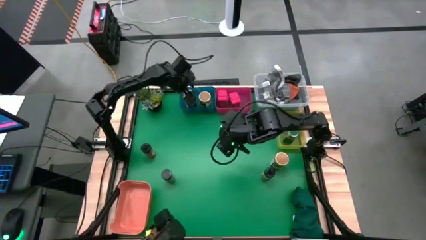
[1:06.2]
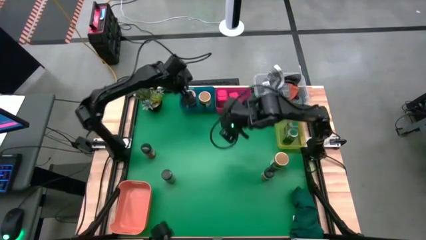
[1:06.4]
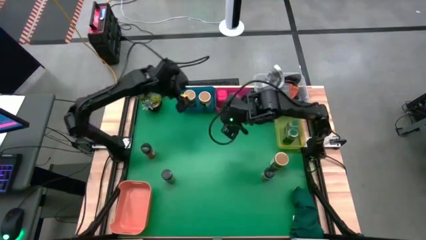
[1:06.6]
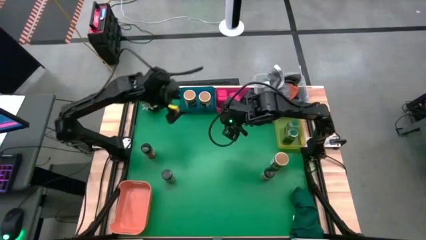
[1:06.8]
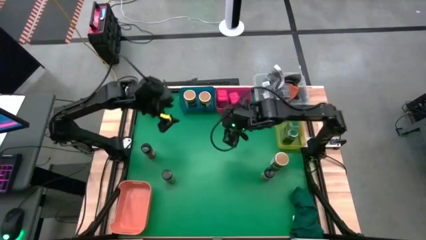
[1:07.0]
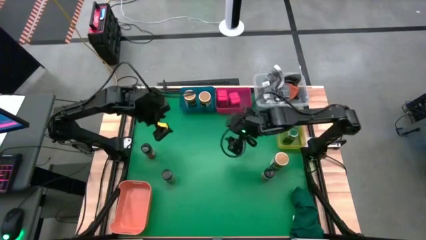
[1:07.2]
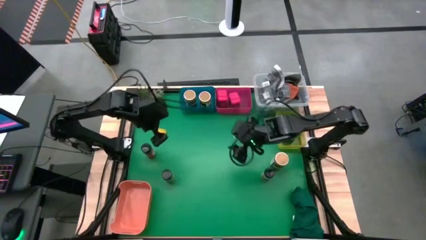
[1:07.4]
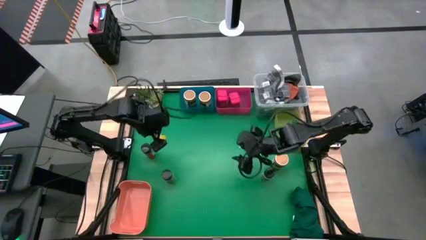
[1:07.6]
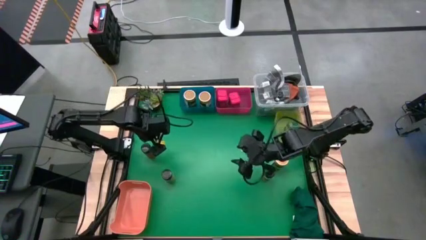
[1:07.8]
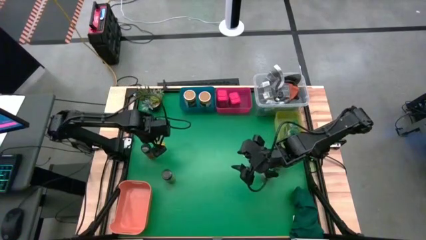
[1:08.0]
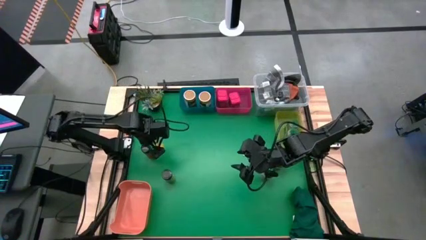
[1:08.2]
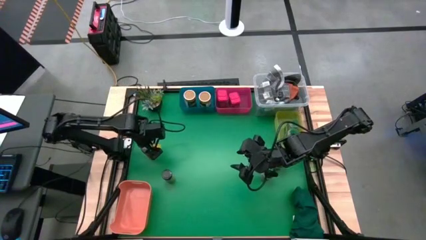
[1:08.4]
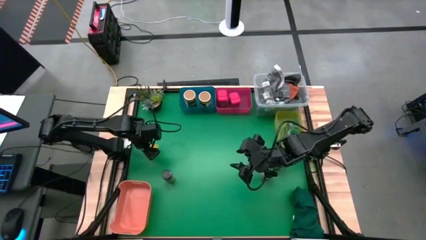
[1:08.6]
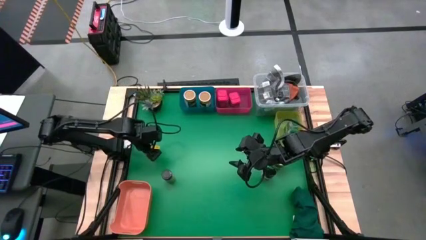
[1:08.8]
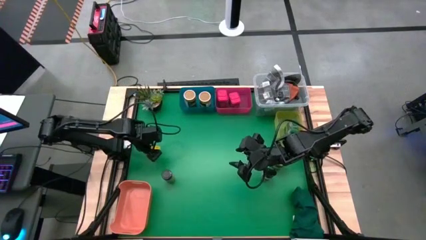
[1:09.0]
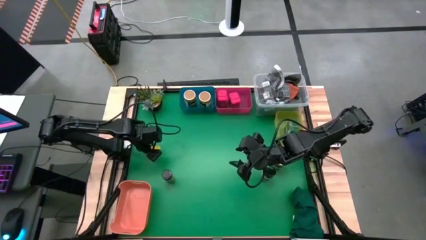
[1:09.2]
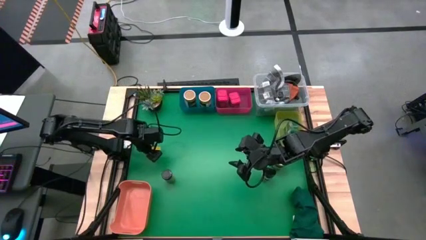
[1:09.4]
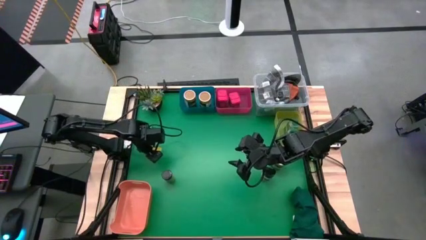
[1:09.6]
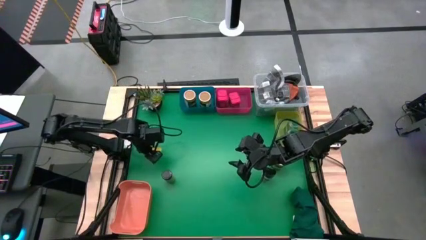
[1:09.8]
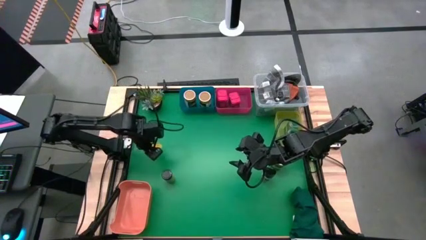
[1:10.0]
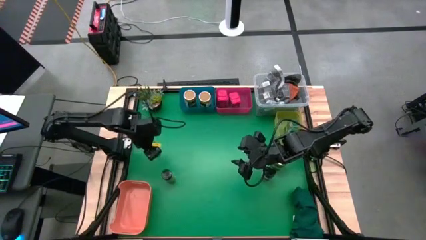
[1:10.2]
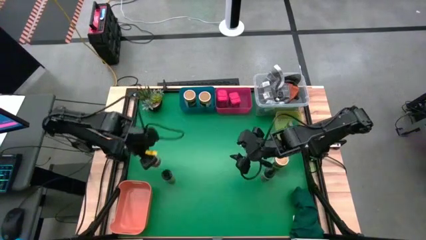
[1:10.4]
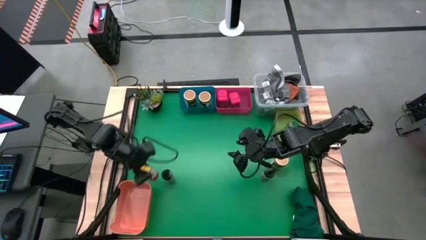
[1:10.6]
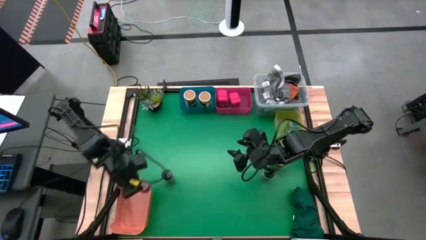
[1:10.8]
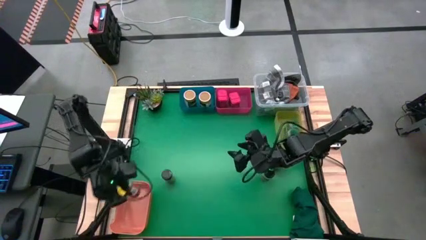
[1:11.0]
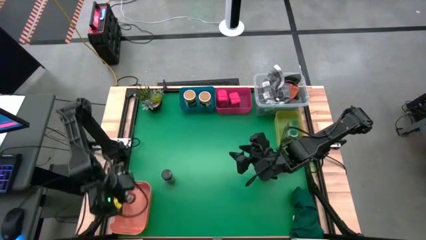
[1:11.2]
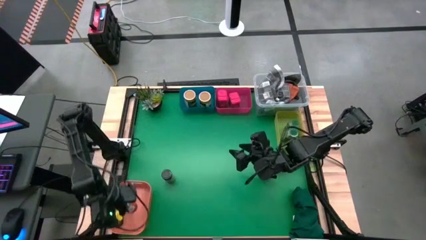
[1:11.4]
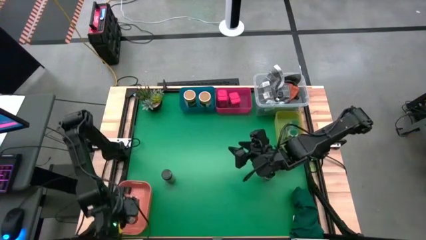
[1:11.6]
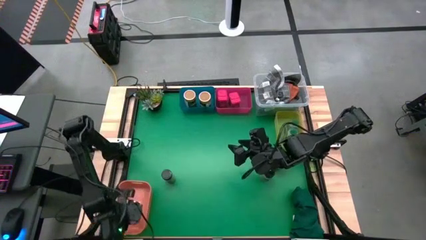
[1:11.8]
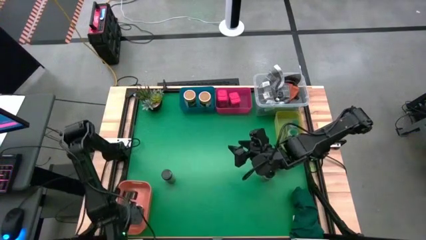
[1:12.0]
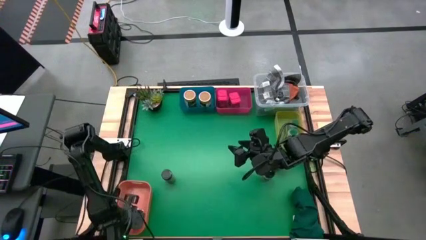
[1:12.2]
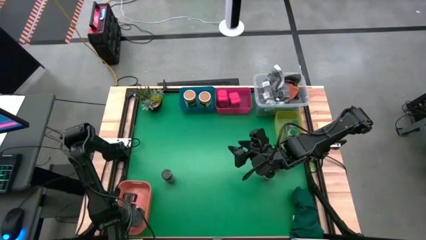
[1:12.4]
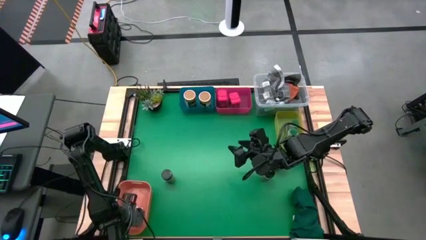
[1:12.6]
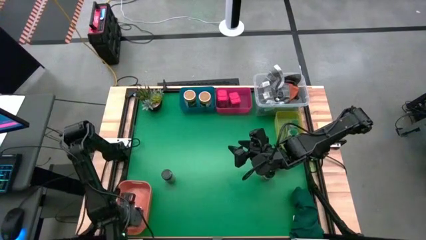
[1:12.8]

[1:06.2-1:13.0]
Task: Sort spices by type
Put the top left black spice bottle into the orange bin

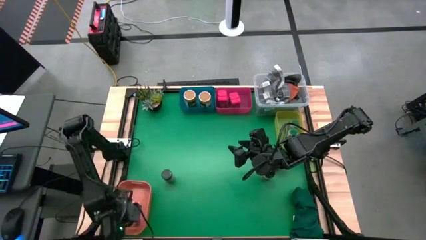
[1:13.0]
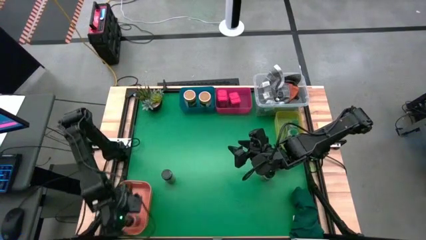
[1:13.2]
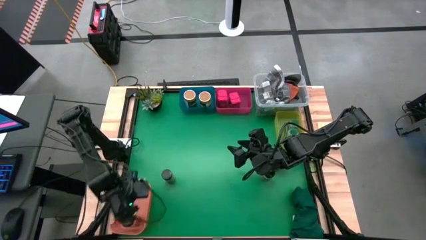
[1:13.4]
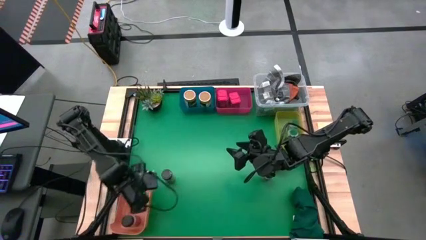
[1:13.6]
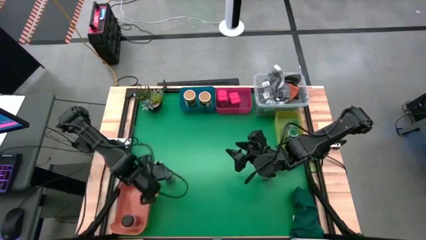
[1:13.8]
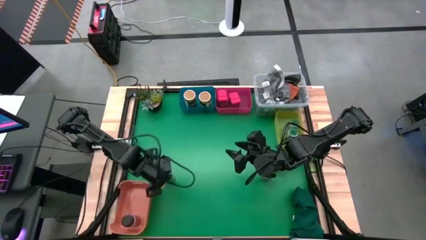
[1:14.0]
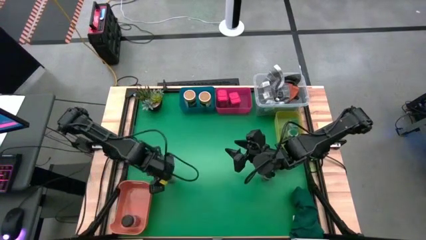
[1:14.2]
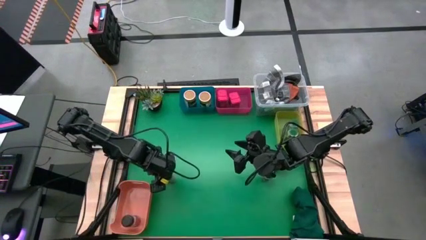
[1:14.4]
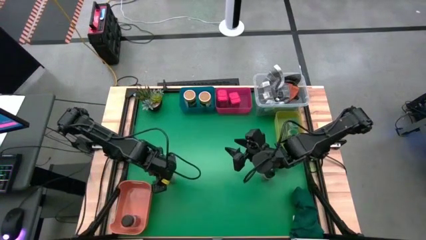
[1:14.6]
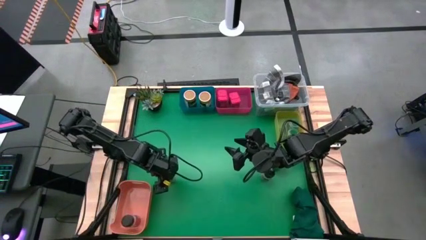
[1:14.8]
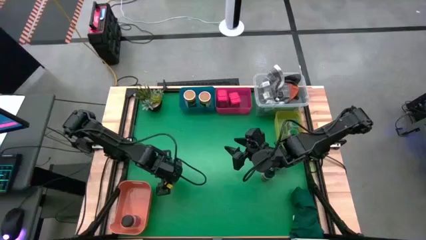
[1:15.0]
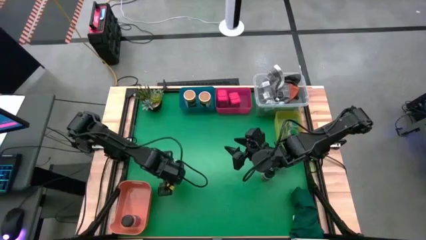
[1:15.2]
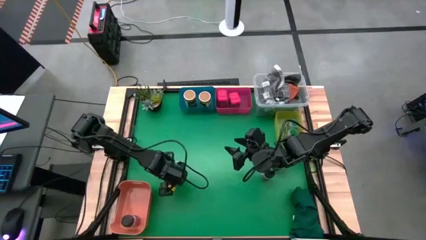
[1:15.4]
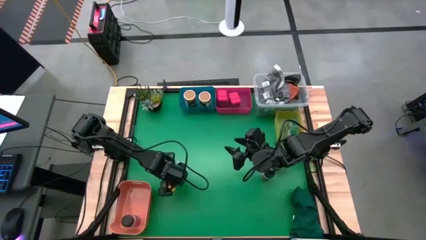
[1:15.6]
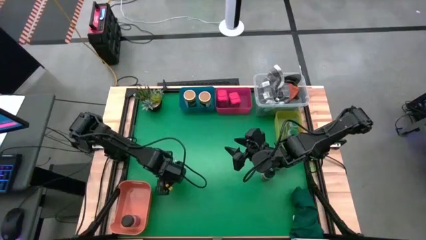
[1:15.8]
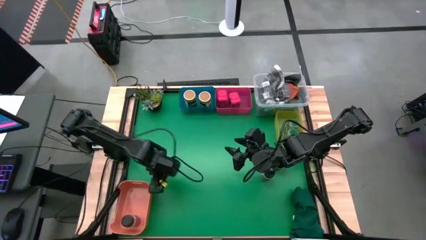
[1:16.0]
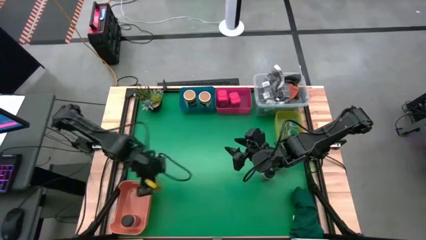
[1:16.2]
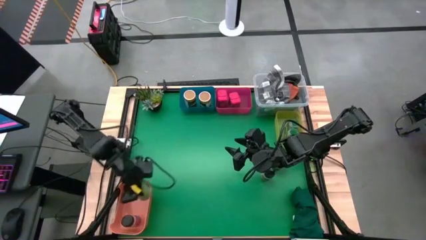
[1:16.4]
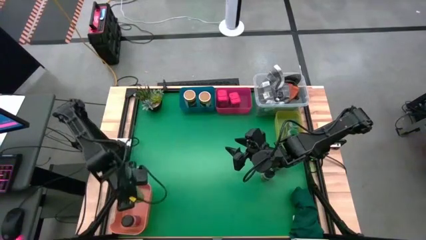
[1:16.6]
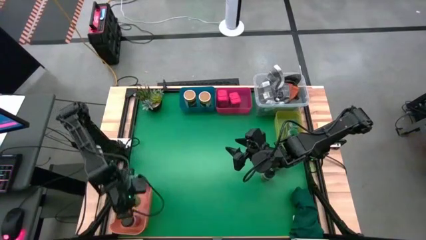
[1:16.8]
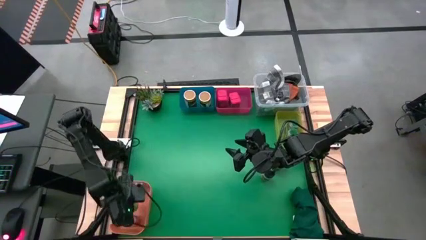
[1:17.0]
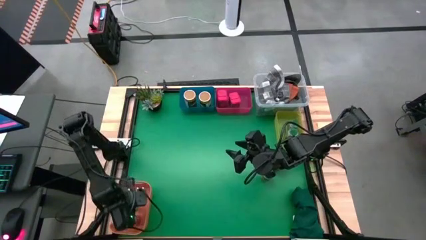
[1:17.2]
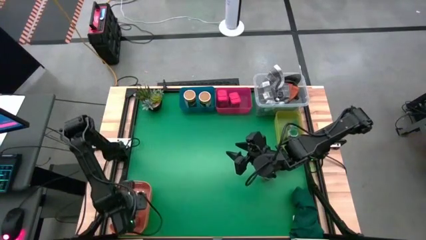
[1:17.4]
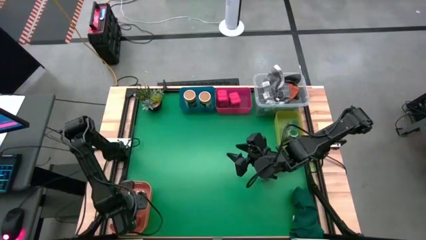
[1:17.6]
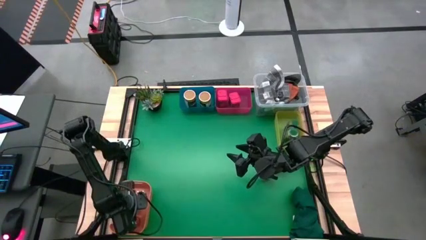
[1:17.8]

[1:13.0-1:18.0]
Put the left black spice bottle into the orange bin

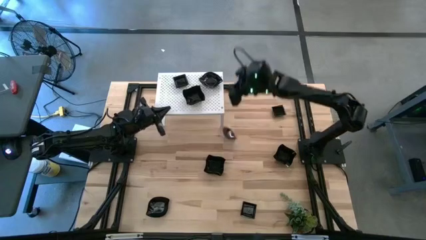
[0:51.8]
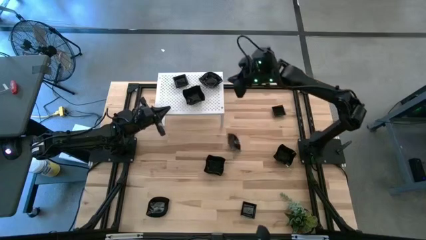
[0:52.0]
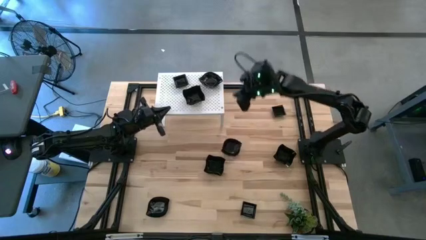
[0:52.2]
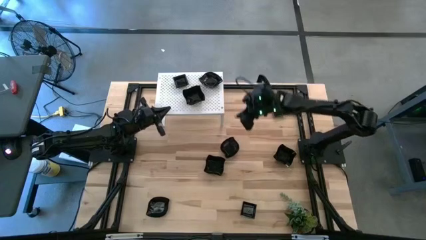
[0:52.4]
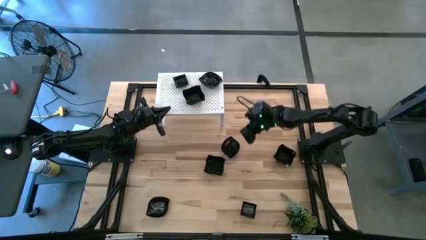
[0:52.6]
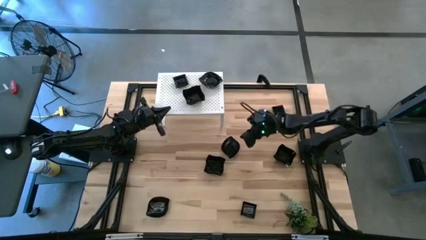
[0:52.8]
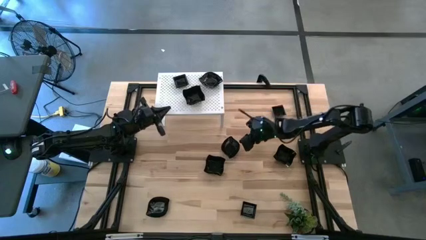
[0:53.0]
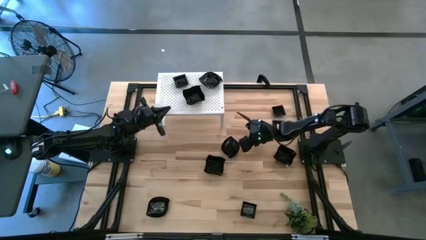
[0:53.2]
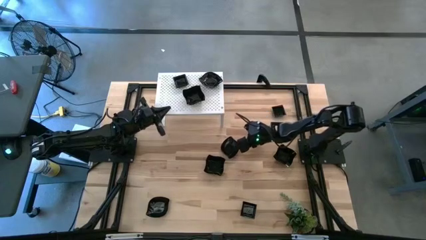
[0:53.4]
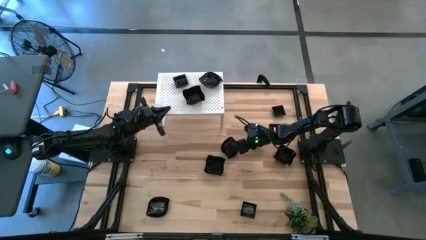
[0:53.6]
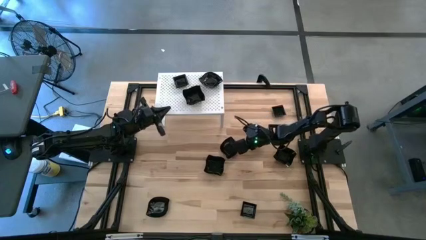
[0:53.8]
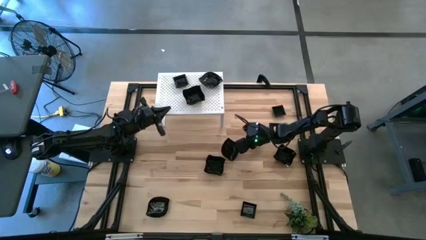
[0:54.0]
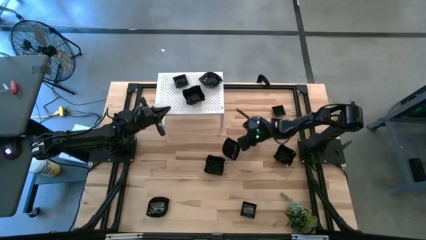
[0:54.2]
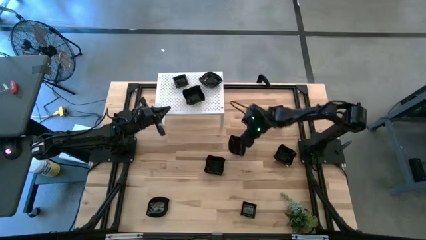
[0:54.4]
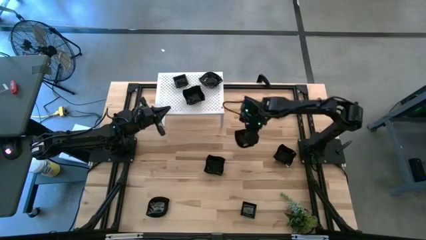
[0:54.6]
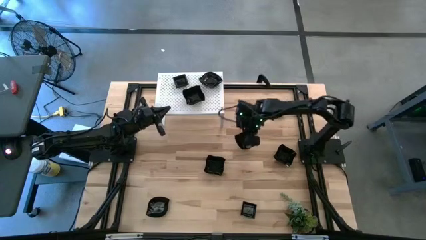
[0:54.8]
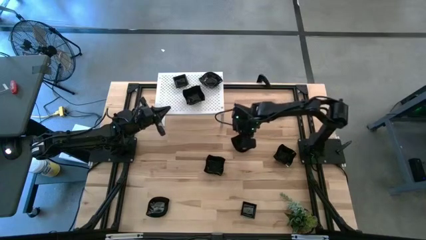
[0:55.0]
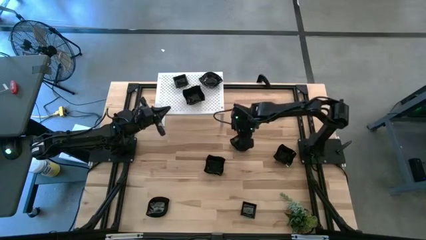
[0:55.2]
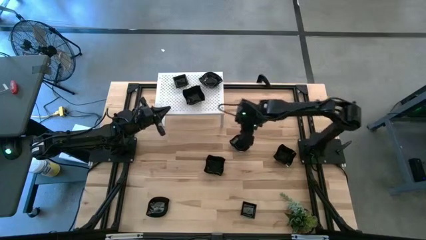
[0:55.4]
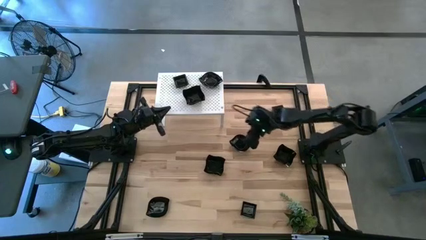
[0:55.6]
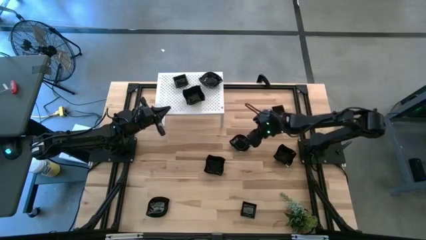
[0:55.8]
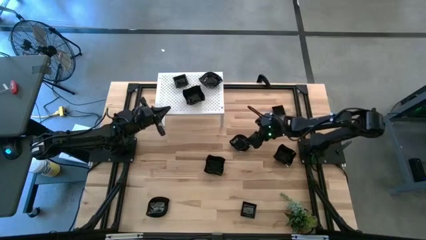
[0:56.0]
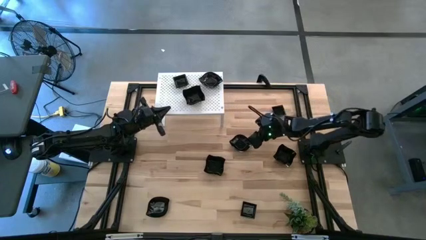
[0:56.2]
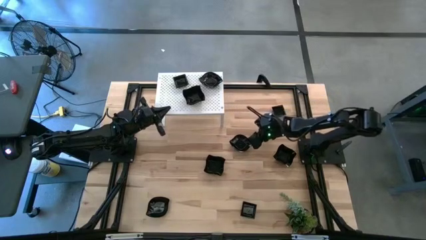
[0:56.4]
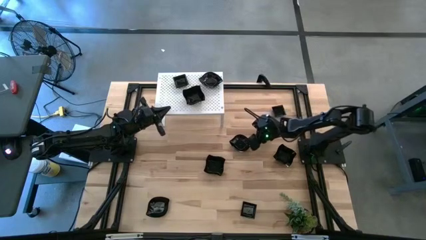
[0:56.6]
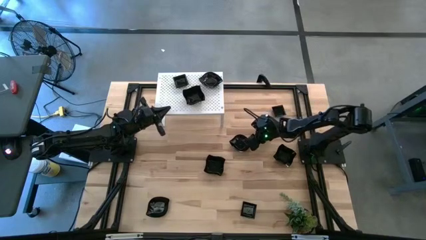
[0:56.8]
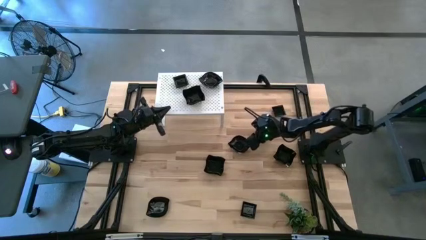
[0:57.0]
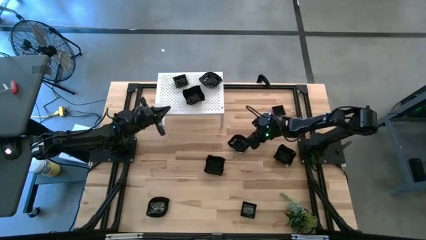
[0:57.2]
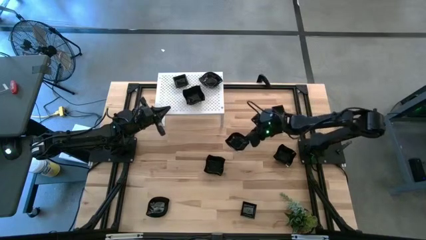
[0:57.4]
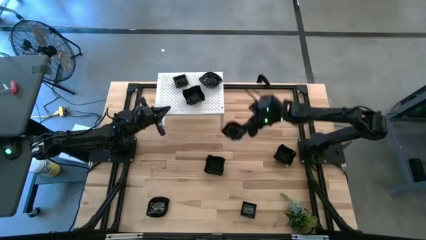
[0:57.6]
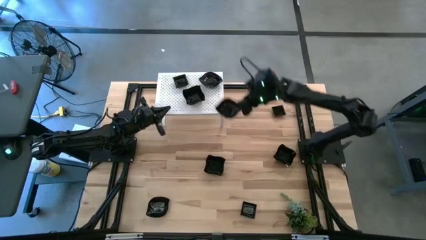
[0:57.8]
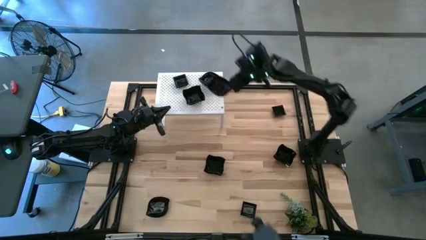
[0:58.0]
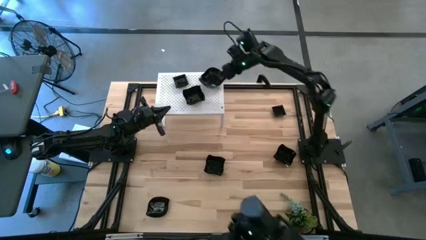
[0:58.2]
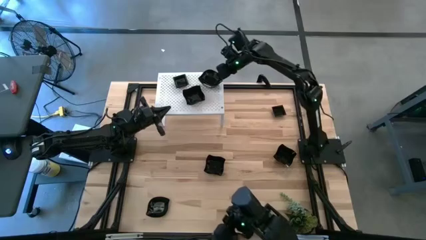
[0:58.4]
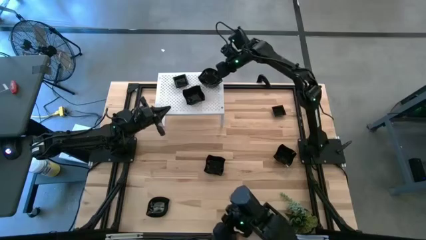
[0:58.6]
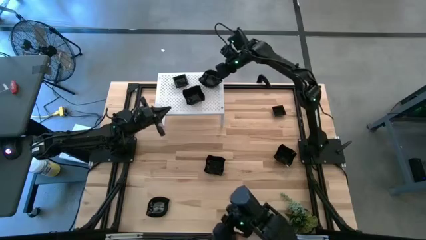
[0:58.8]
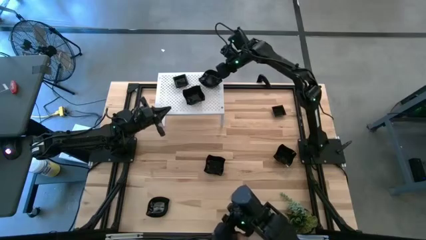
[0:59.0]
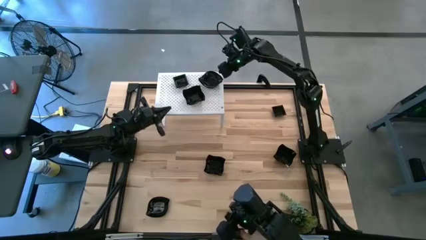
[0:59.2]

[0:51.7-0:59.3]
Task: Pick & Place Mini shaped plates
Stack the black leaf-shaped plate on top of the black leaf-shaped plates on the shelf
